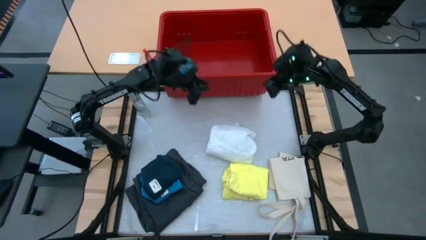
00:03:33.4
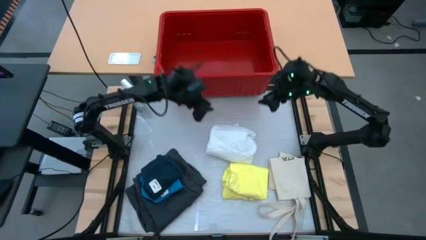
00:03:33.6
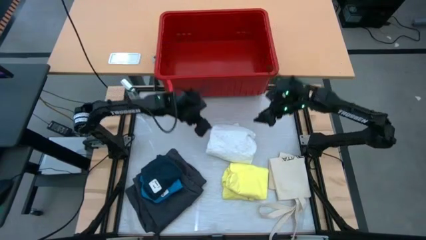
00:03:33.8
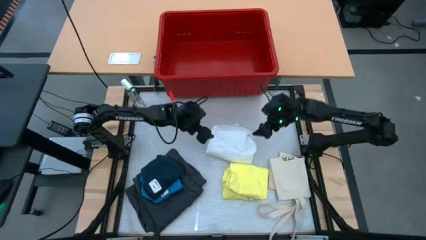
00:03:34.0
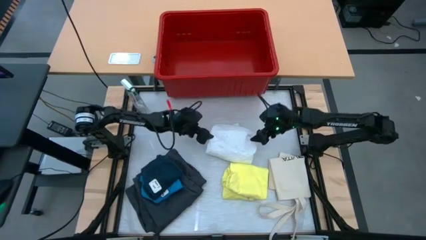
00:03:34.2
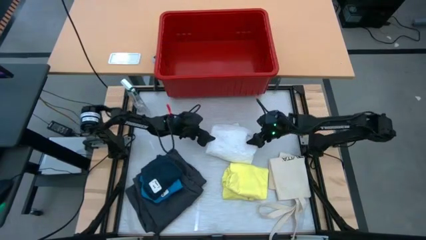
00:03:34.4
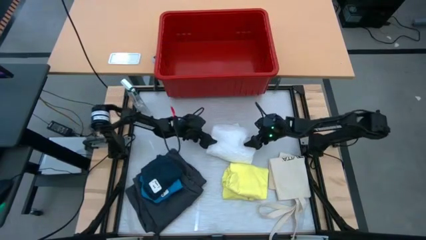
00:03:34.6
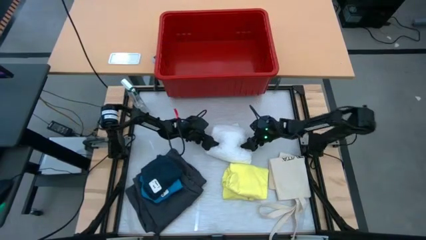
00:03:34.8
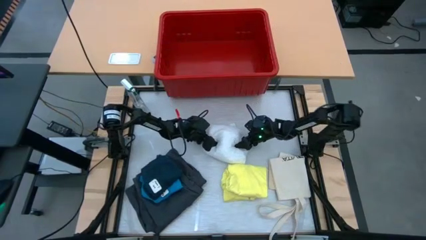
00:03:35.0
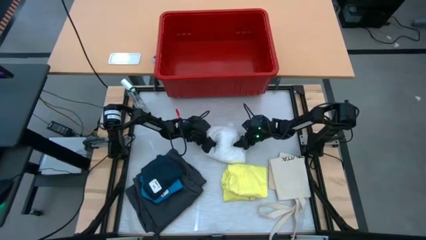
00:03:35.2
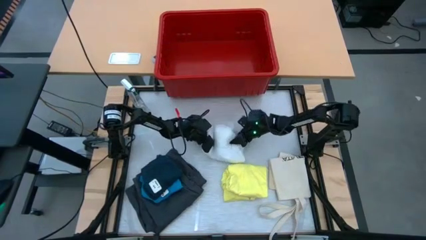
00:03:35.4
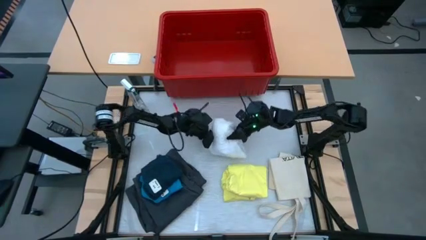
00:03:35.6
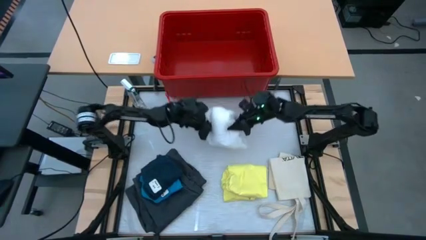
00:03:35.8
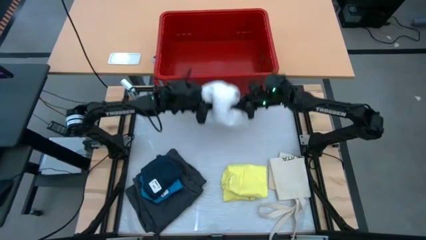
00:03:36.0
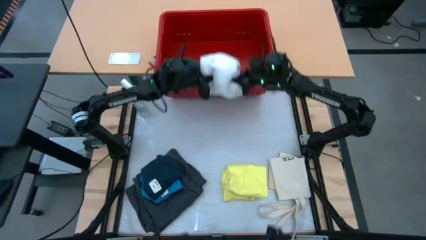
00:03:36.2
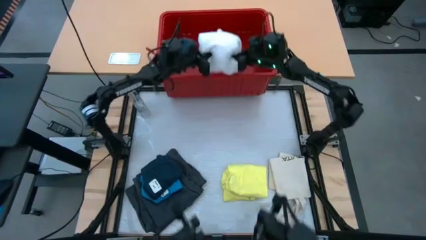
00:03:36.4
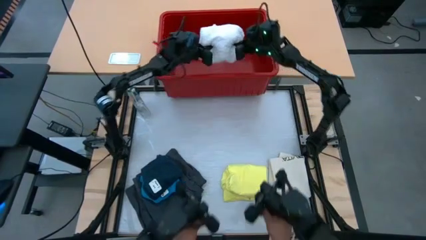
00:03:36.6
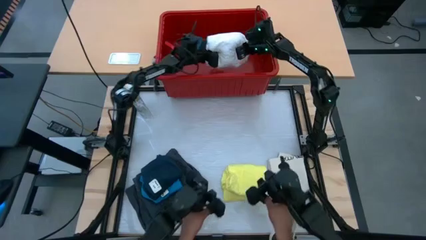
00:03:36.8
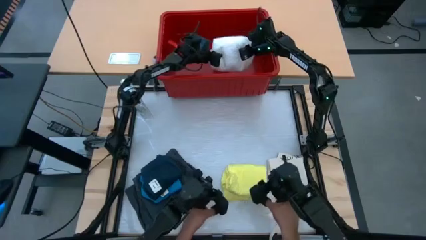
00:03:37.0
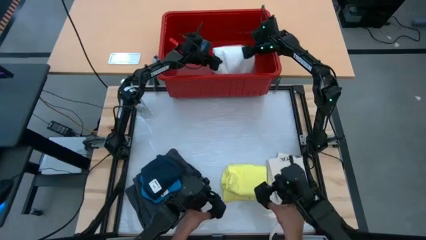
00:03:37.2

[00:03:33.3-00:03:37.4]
Task: Fold laundry
Put the folded white blouse into the red laundry bin

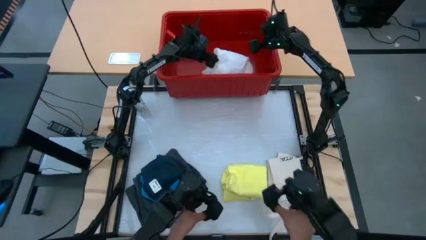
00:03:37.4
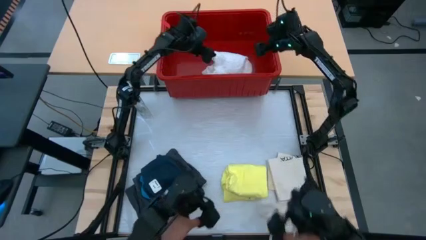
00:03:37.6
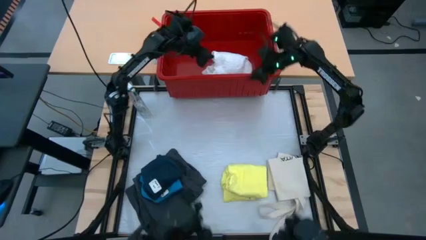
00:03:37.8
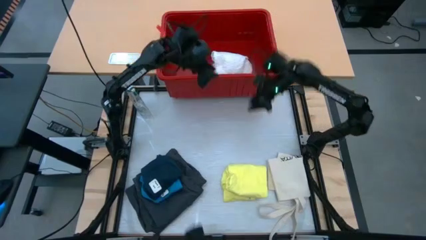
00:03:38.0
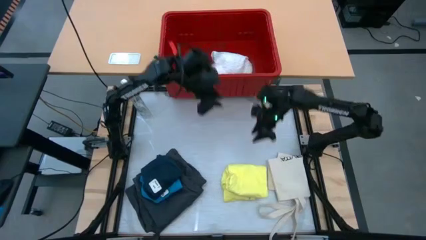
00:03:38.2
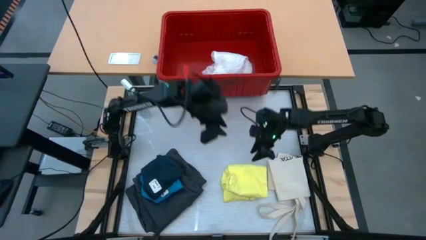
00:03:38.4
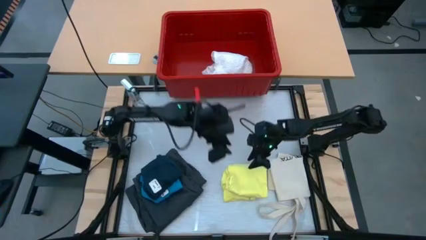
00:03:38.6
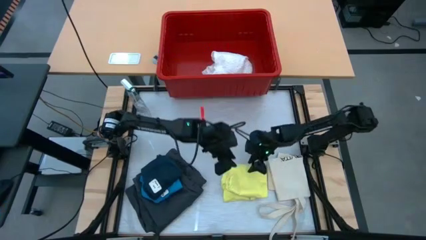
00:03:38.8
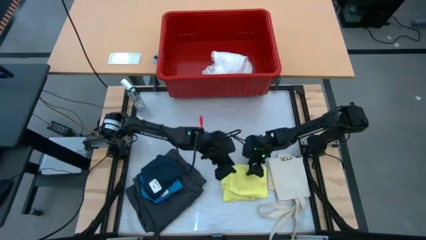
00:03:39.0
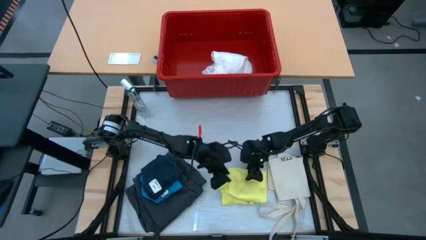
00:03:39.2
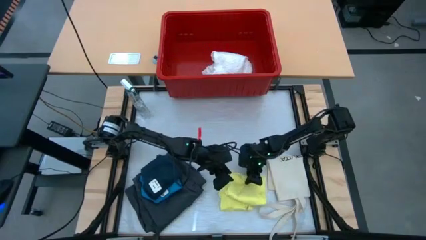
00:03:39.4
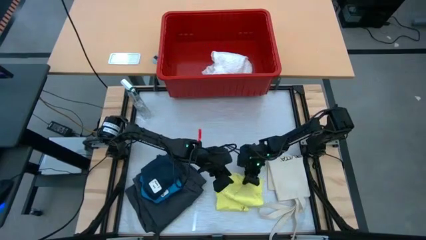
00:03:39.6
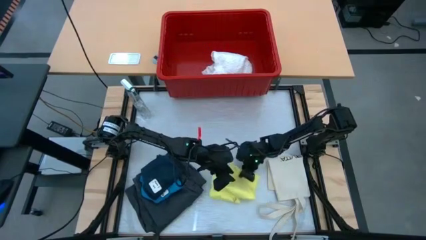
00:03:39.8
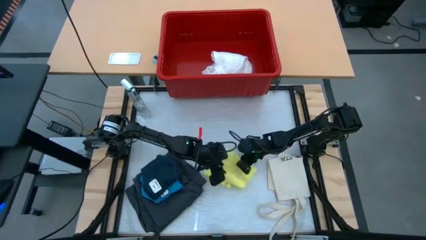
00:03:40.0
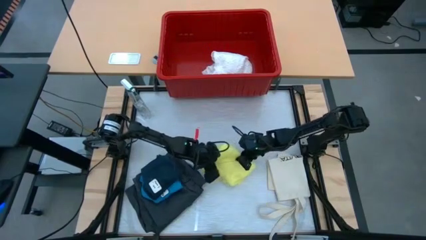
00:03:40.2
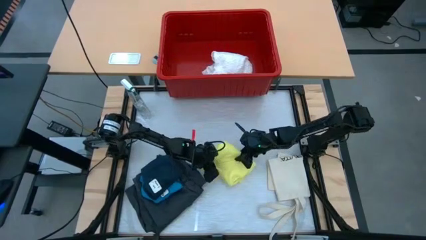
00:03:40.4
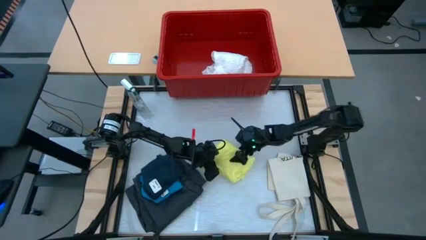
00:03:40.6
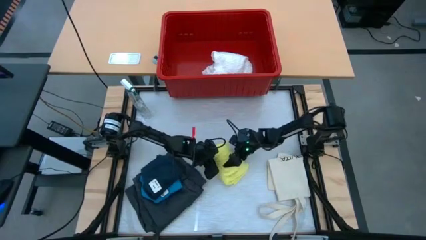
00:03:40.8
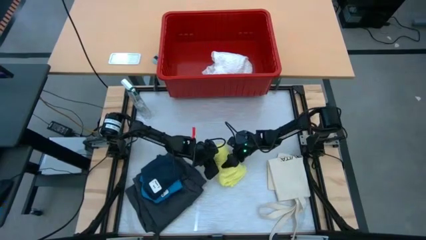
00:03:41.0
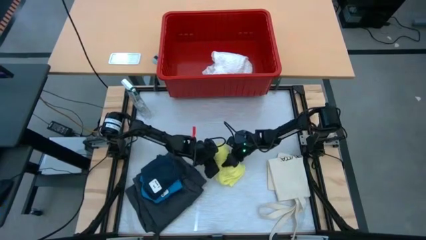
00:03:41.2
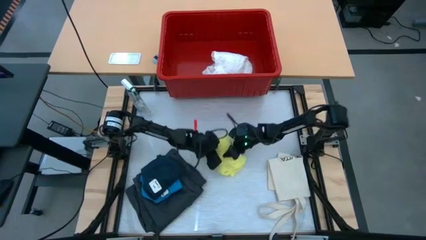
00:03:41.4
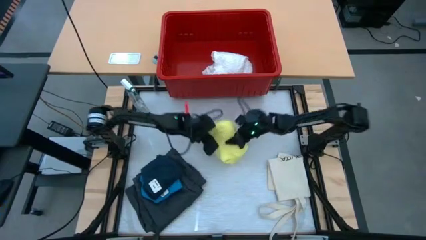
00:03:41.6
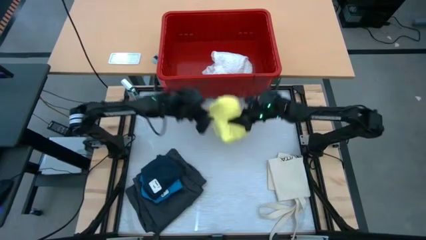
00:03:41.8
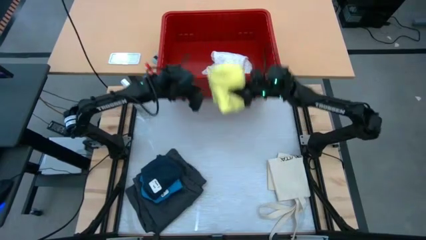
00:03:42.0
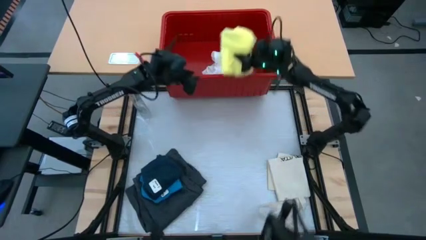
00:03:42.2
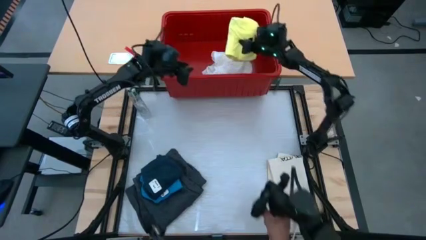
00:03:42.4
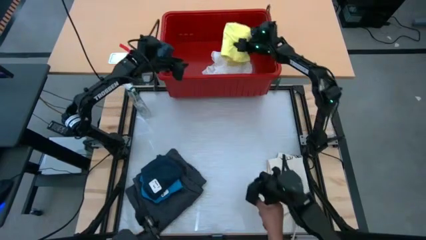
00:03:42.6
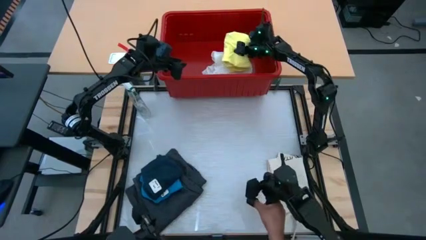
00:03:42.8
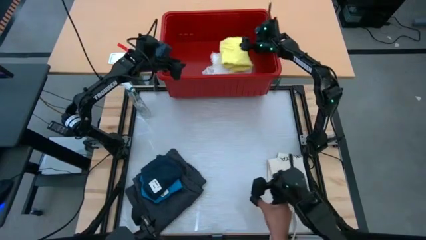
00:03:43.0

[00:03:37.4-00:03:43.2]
Put the folded yellow shirt into the red laundry bin
